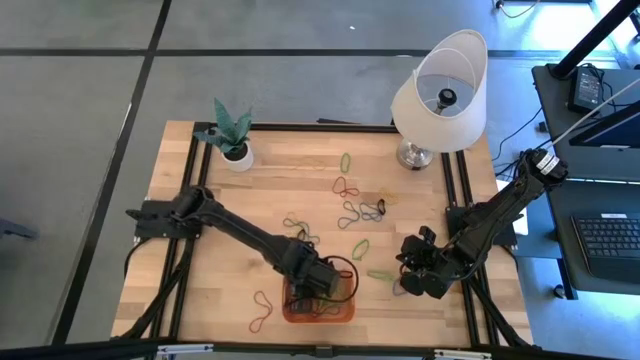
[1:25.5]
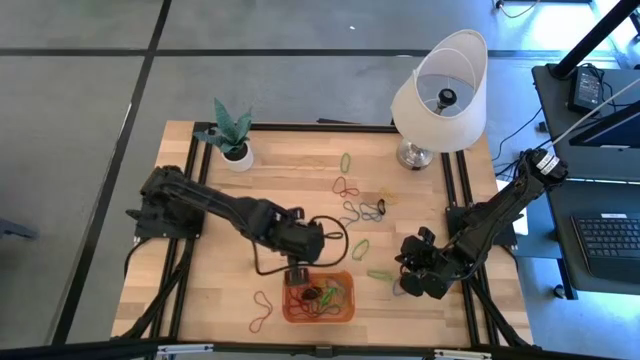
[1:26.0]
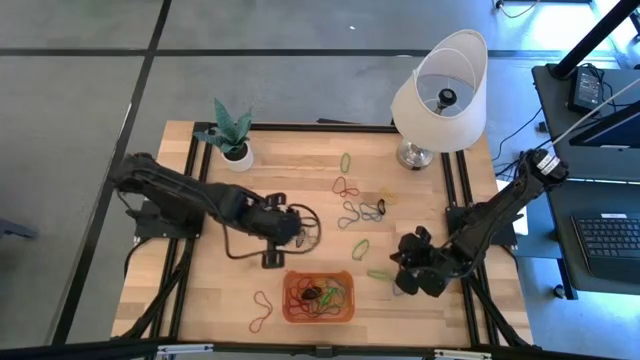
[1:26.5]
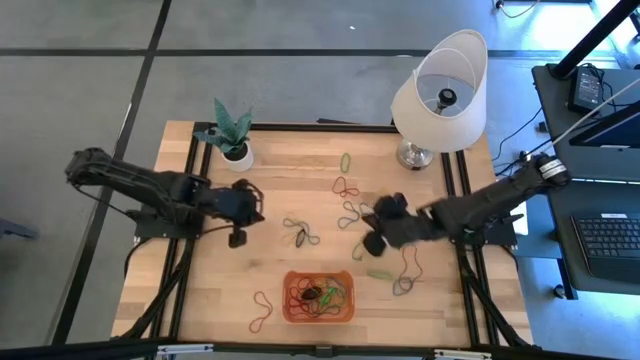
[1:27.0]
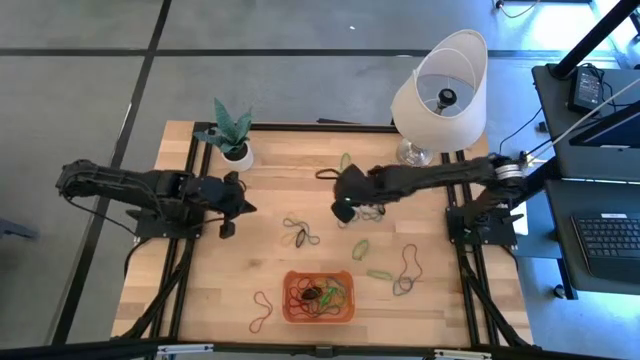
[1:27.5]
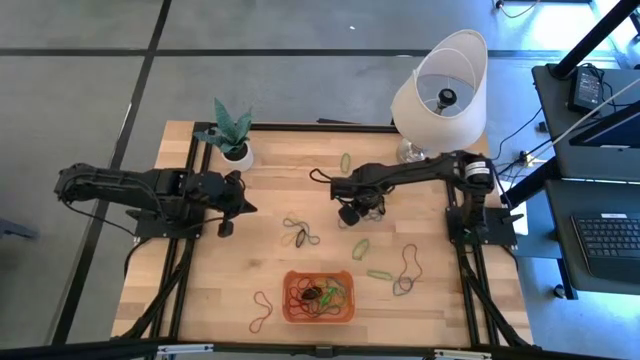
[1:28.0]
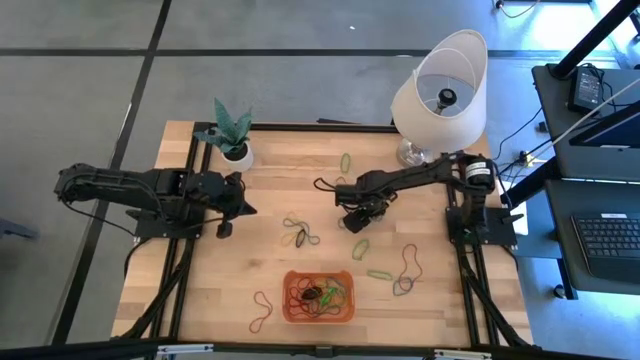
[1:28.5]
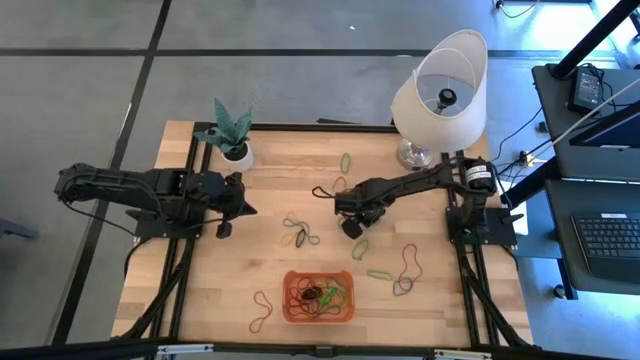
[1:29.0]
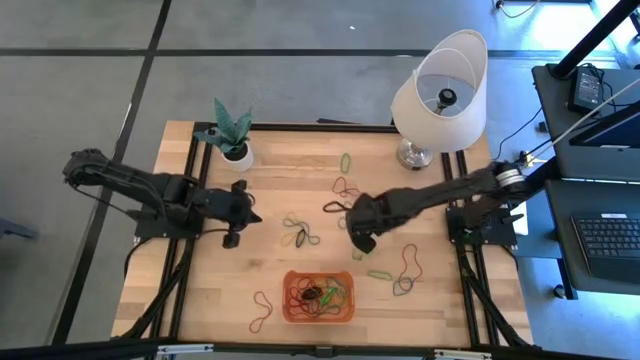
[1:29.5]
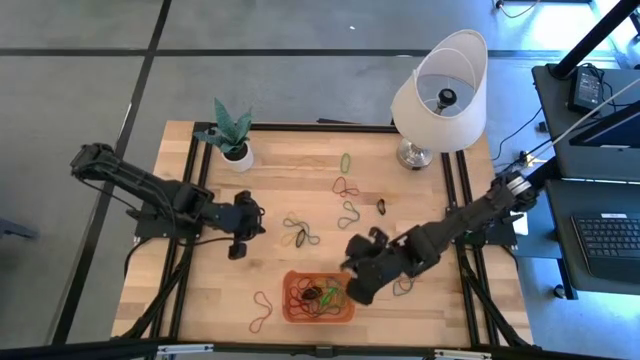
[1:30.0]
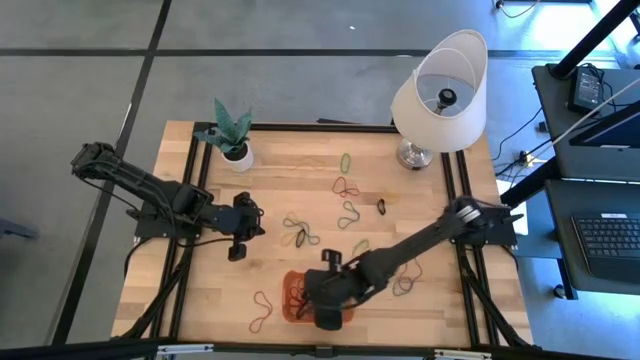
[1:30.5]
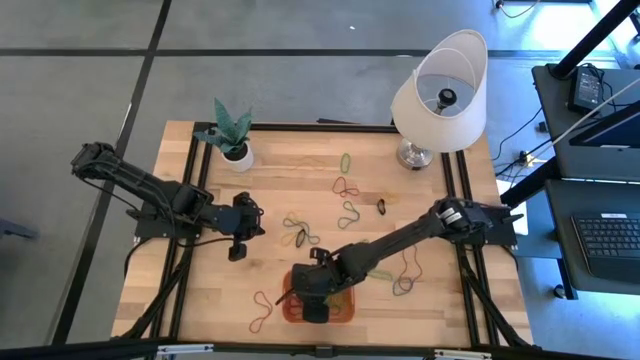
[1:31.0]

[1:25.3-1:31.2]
Task: Pick and place rubber bands into bin
Put the blue rubber band into the bin

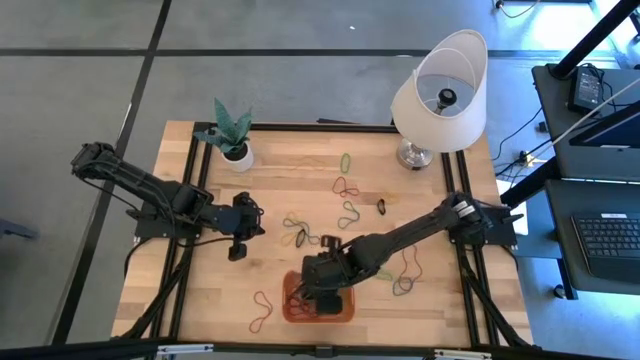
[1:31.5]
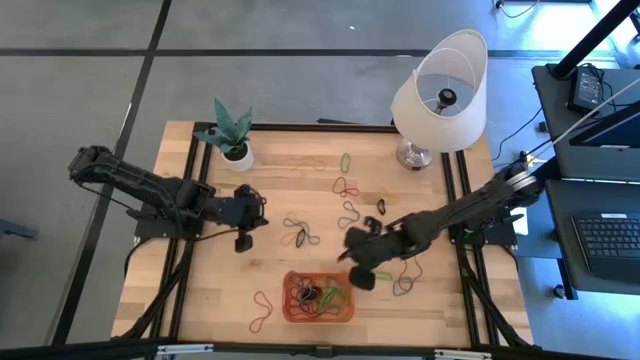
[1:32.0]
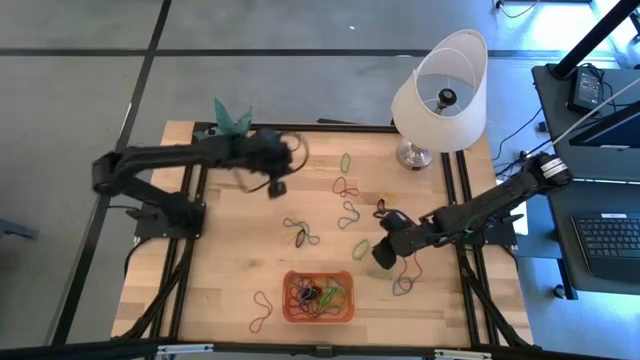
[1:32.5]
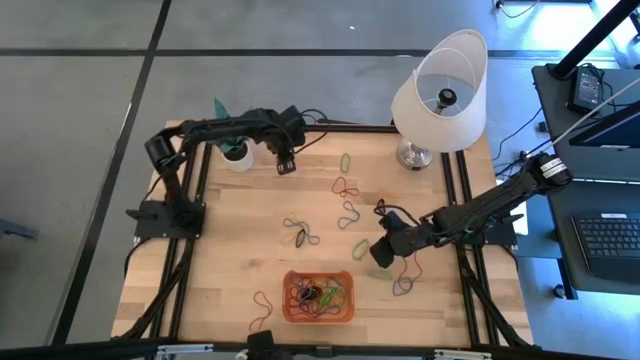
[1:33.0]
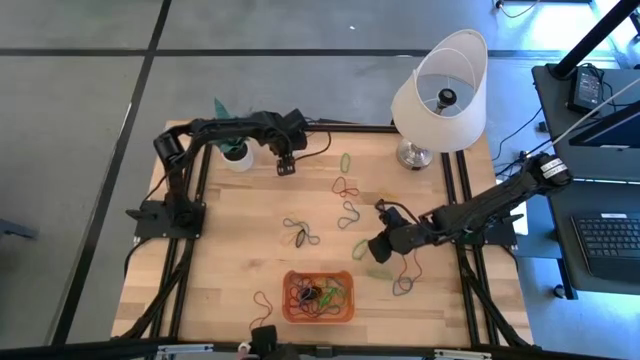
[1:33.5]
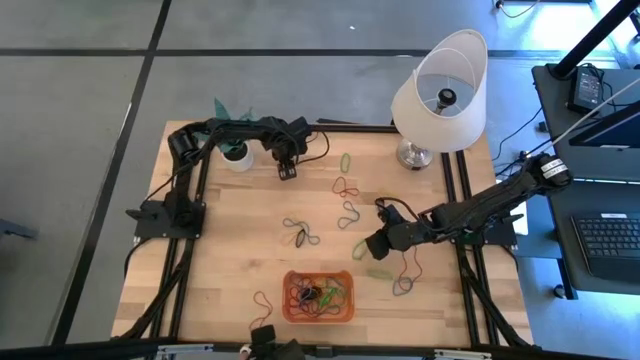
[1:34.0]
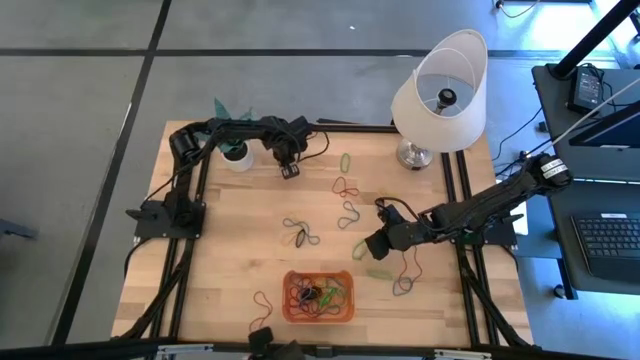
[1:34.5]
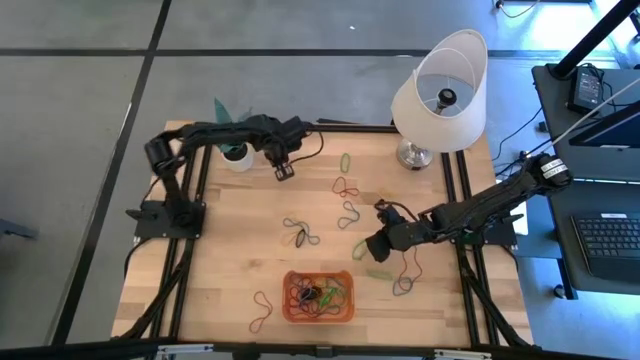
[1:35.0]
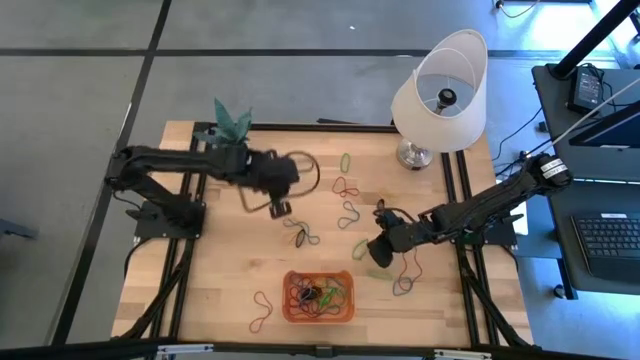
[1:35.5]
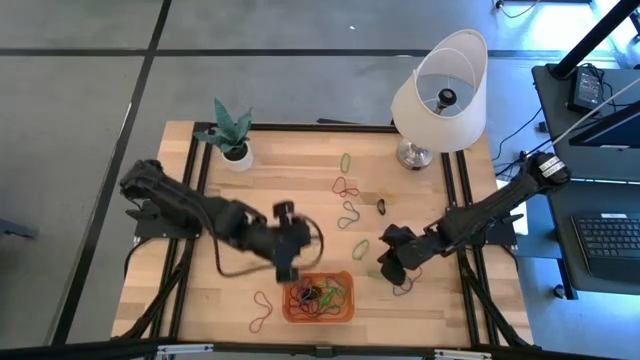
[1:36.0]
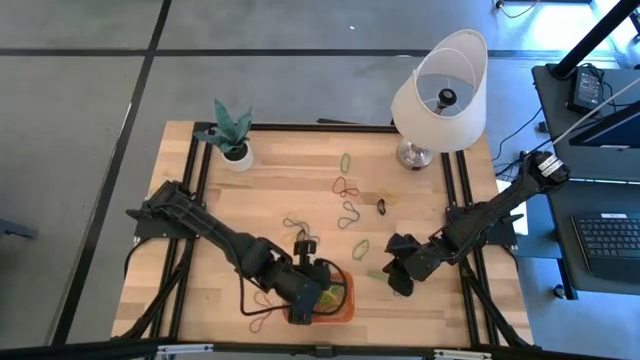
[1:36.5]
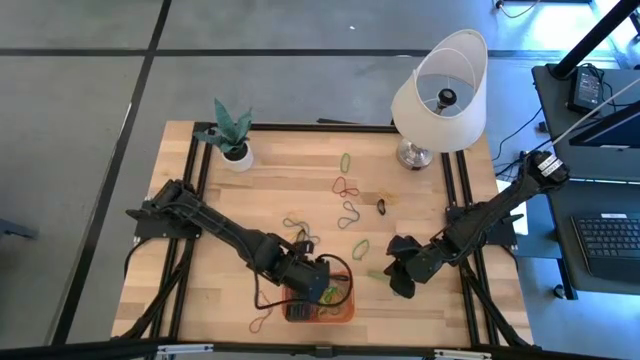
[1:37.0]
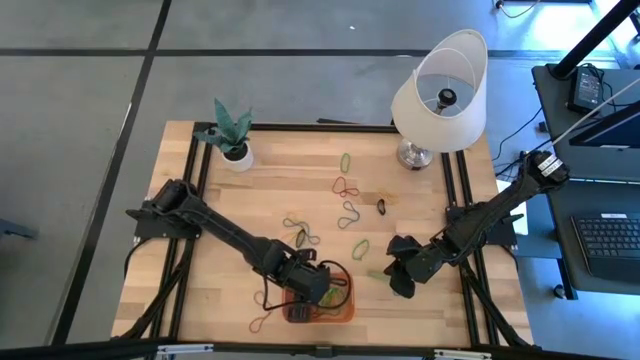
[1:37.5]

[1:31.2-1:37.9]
Put the top yellow rubber band into the bin

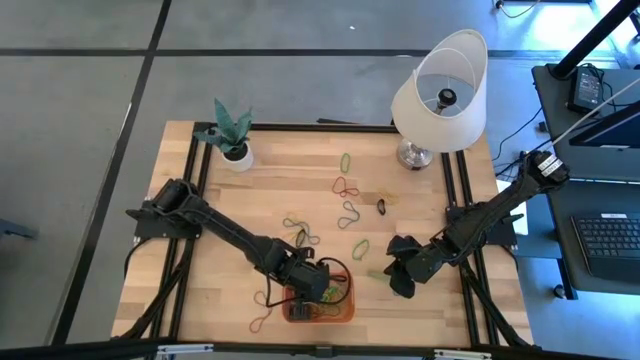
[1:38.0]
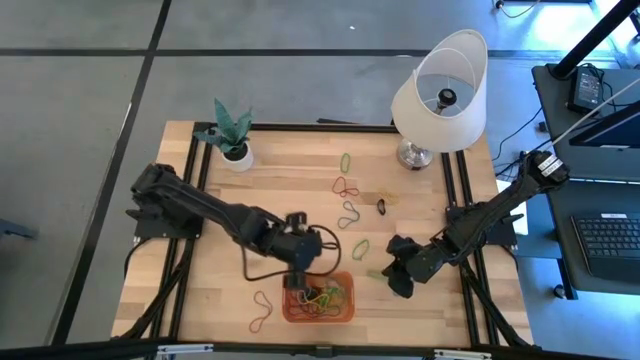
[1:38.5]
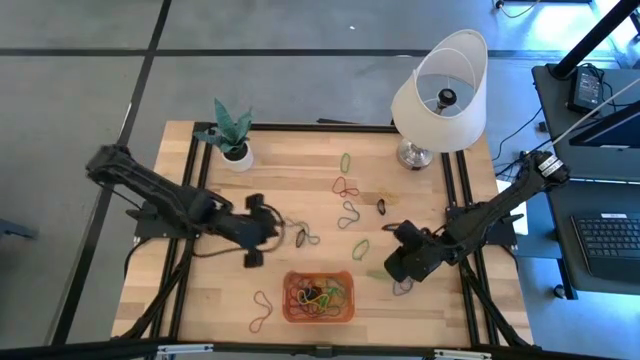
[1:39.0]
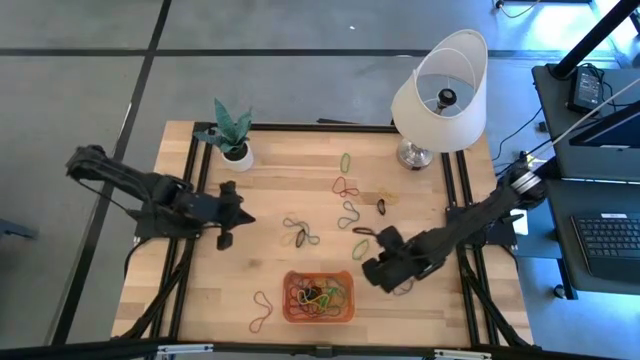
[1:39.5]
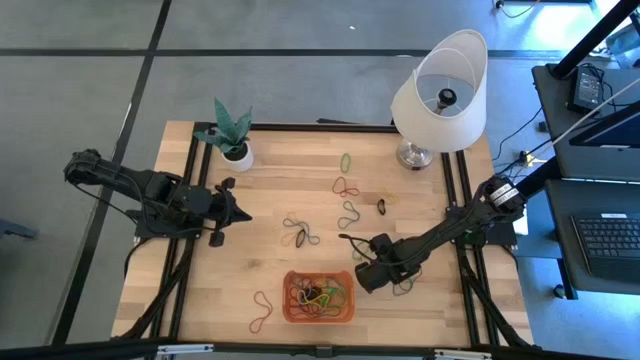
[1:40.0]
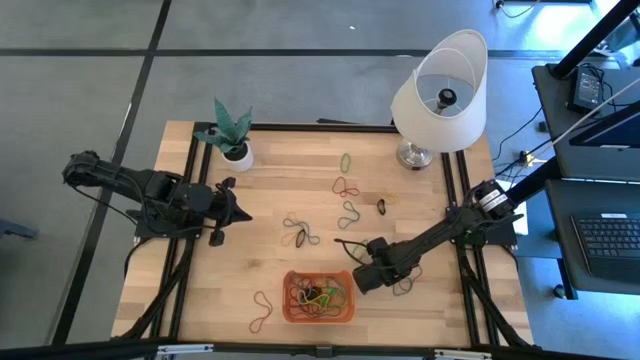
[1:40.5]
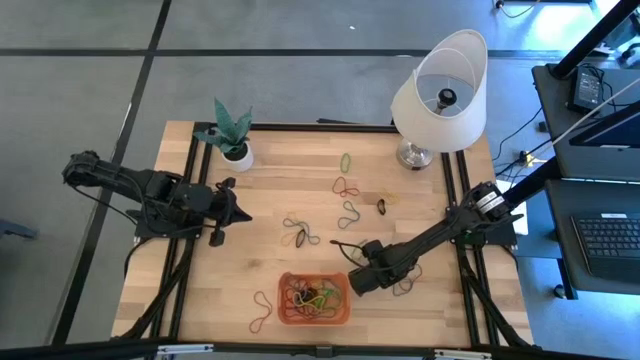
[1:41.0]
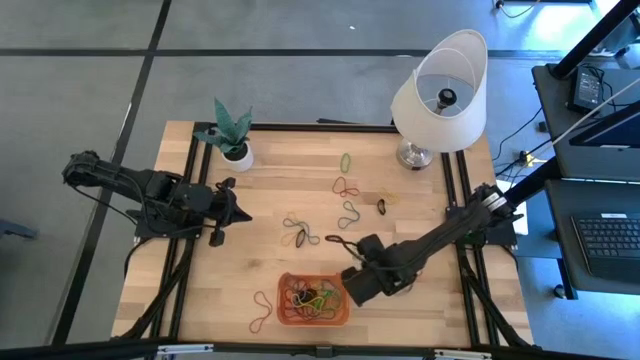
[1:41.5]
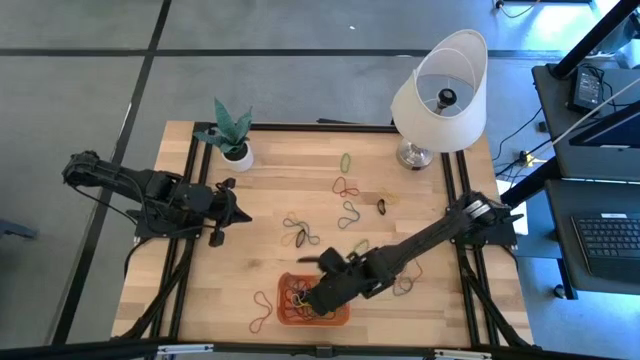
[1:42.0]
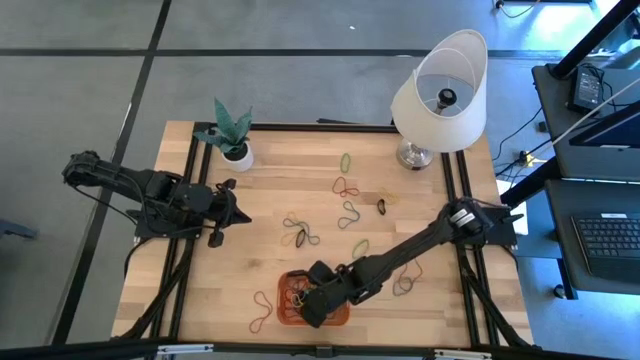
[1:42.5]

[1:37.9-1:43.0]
Put the bottom green rubber band into the bin

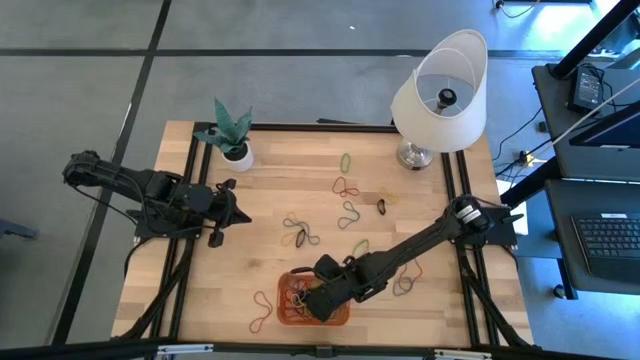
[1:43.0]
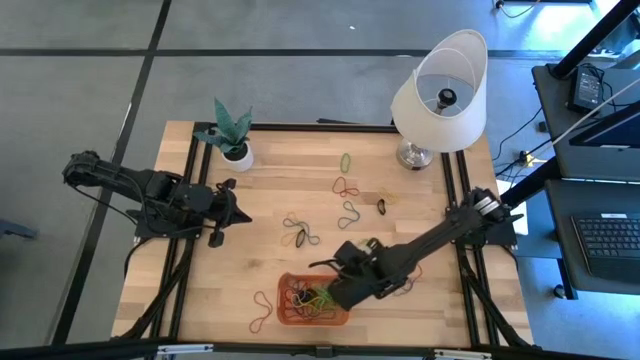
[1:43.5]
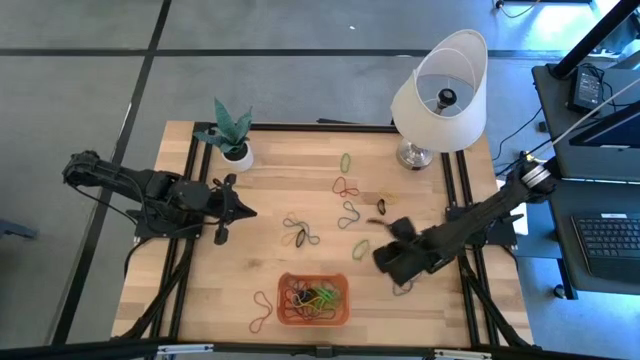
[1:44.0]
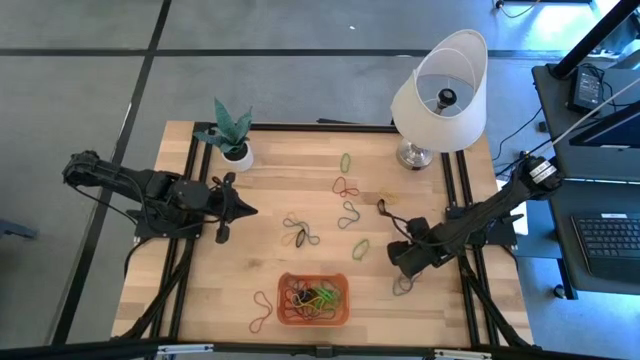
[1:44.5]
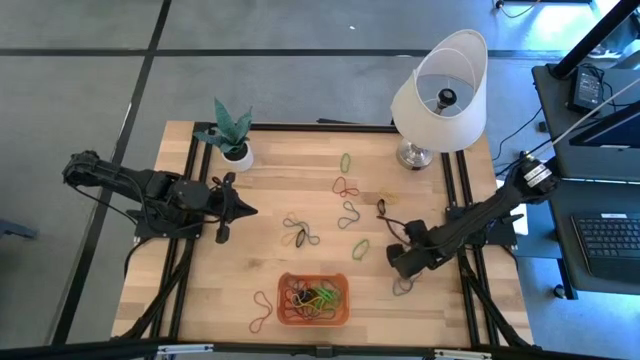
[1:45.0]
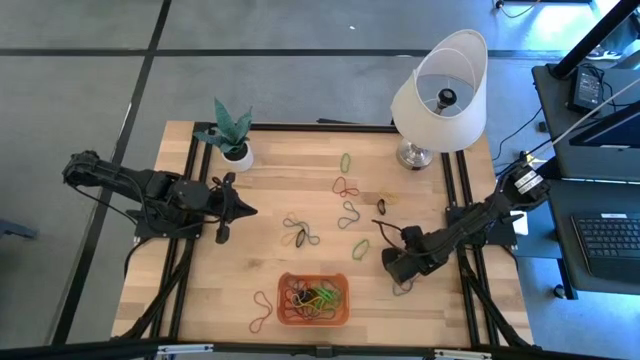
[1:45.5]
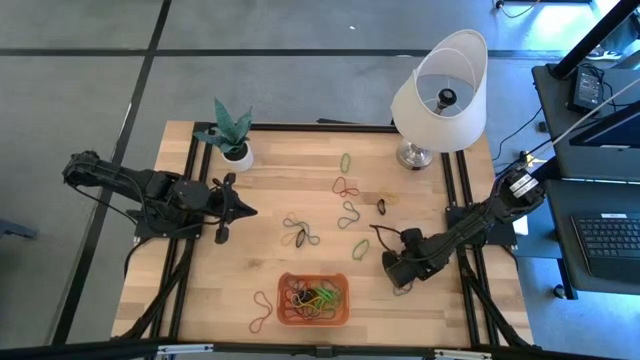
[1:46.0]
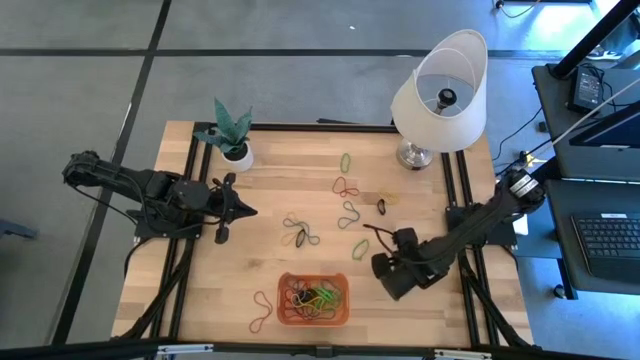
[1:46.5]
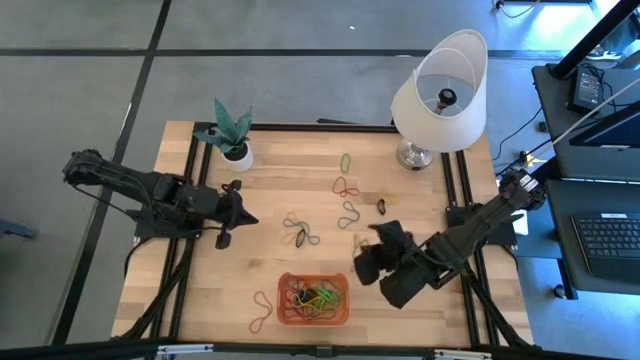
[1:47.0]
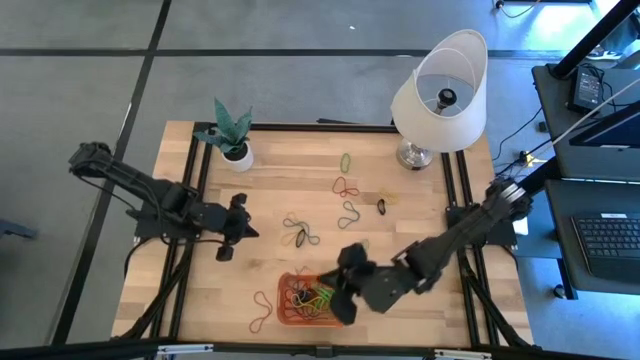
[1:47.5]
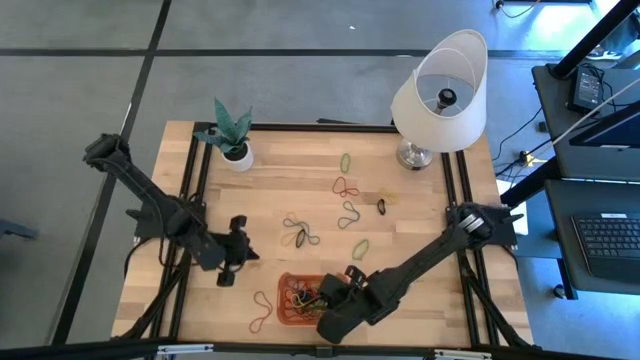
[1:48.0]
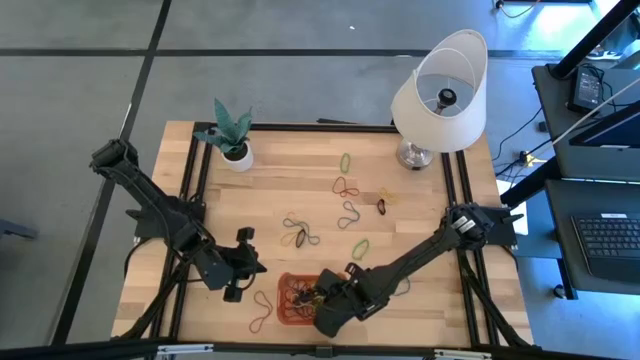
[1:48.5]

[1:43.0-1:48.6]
Put the right red rubber band into the bin
